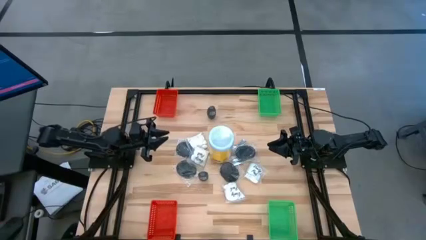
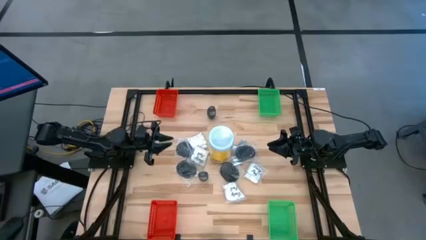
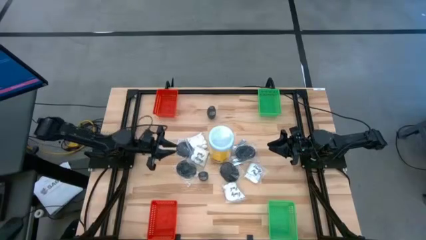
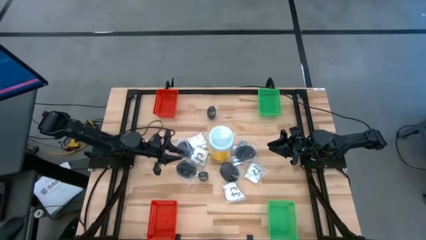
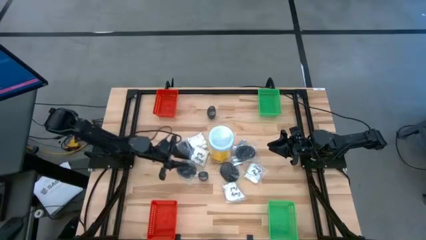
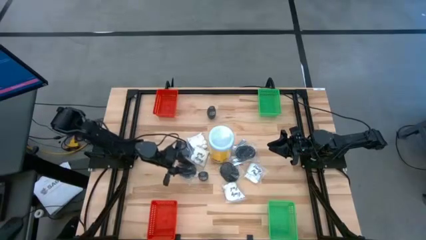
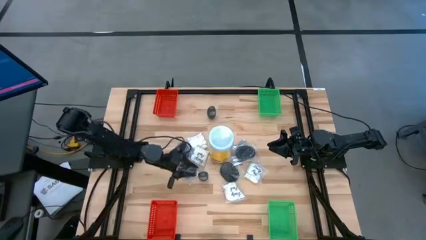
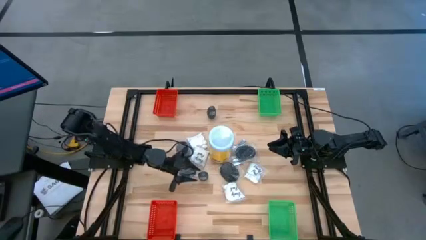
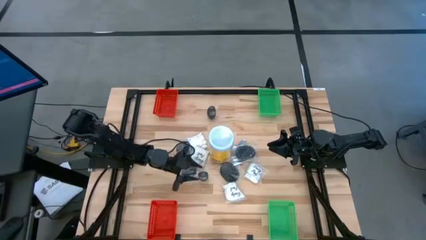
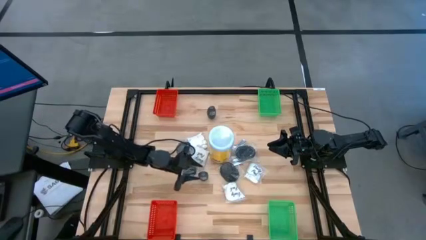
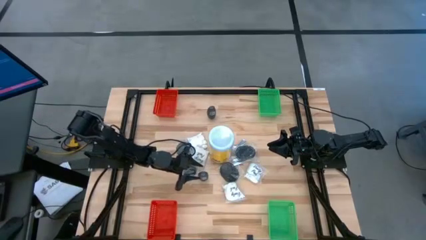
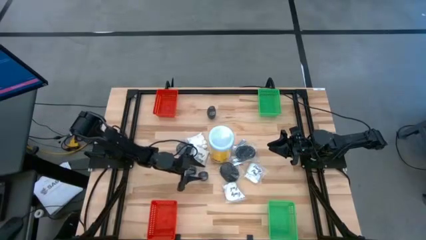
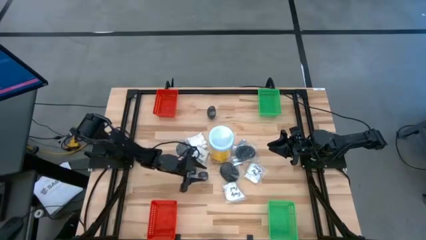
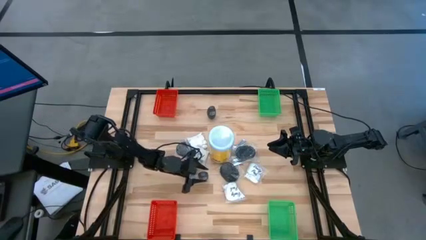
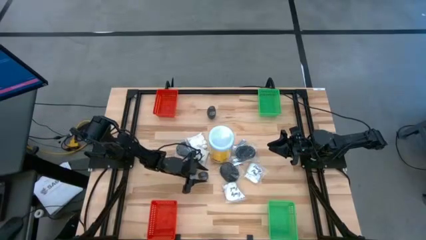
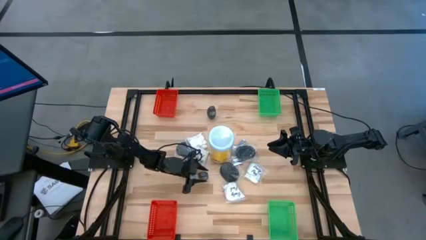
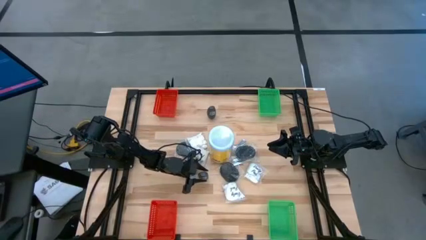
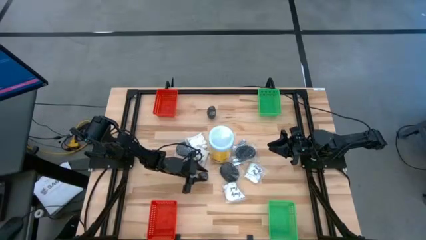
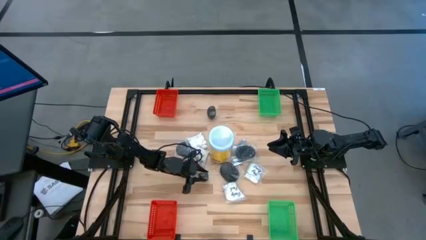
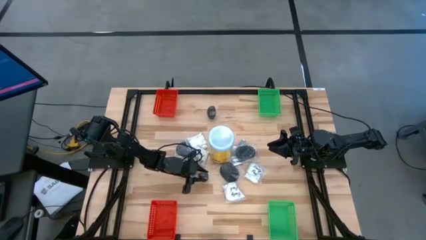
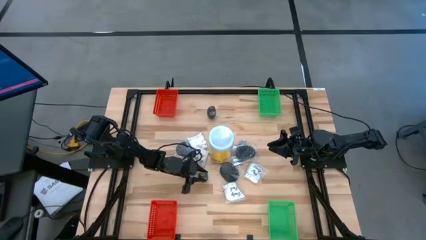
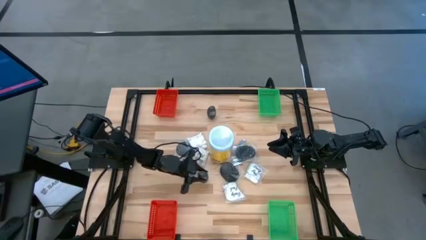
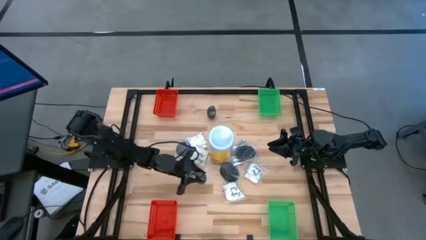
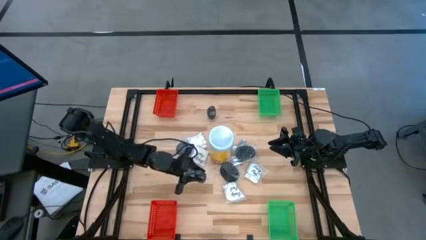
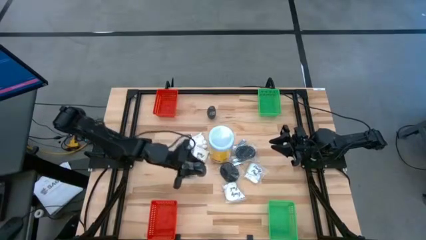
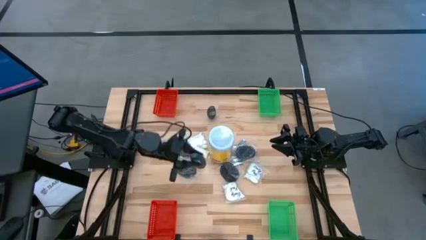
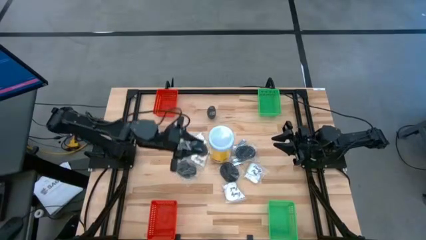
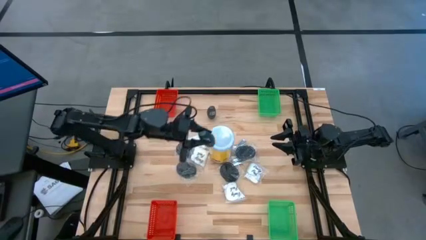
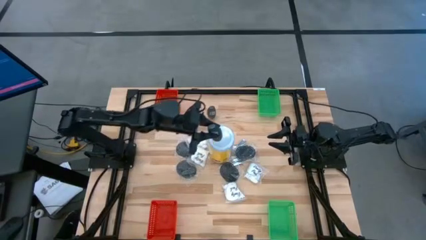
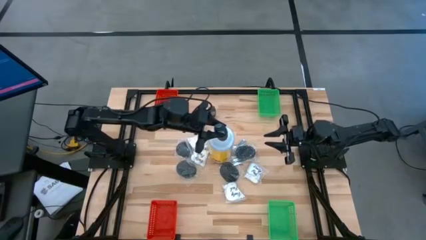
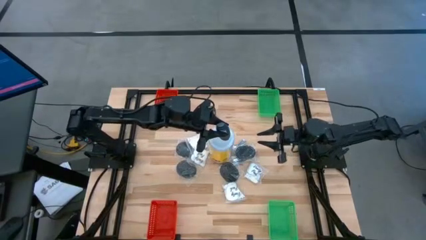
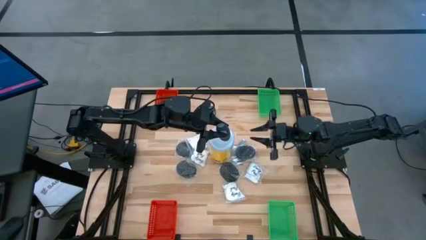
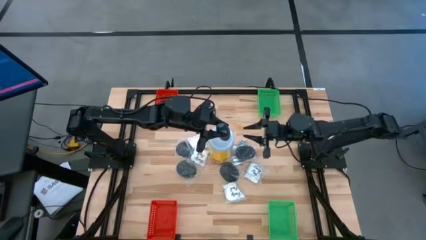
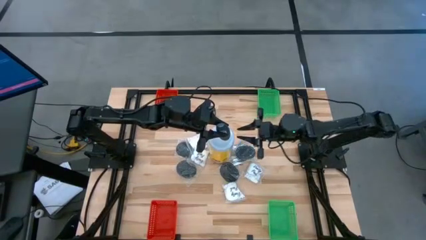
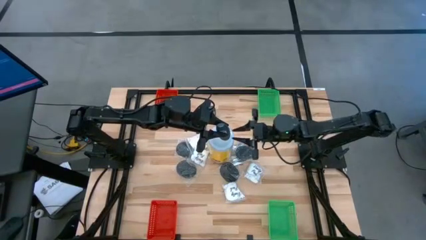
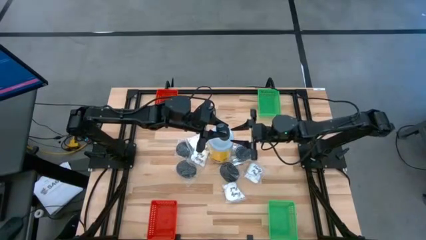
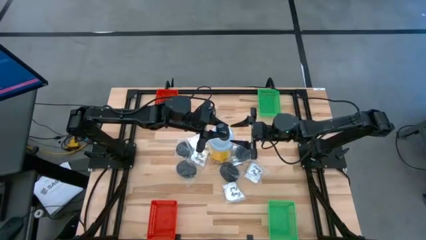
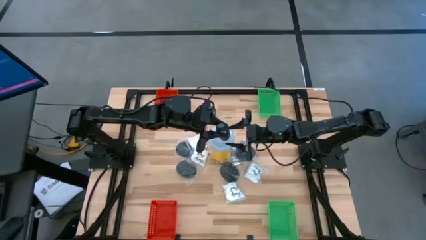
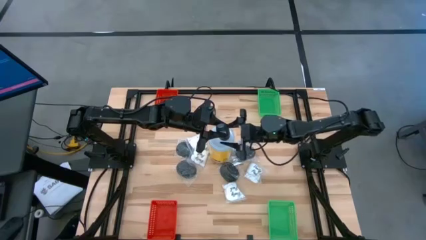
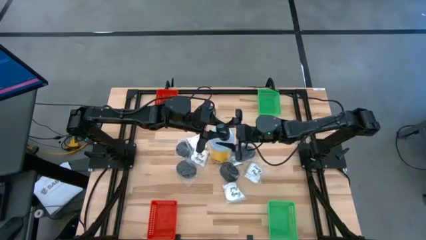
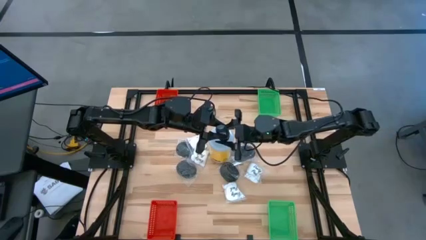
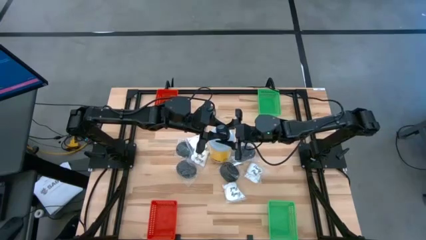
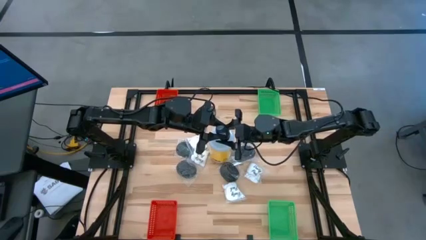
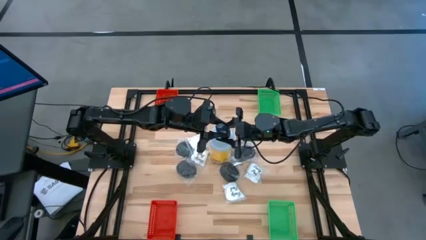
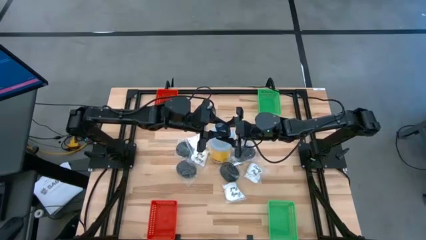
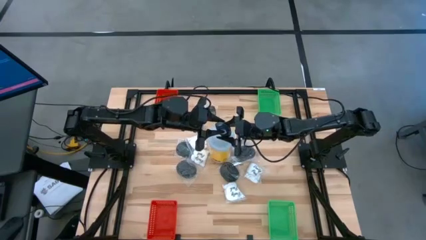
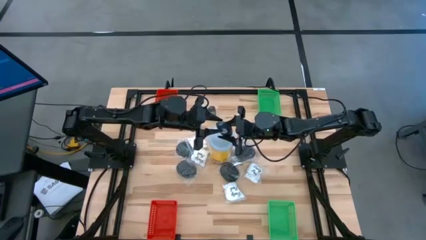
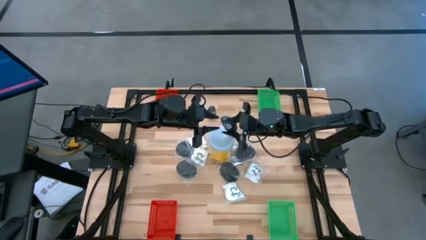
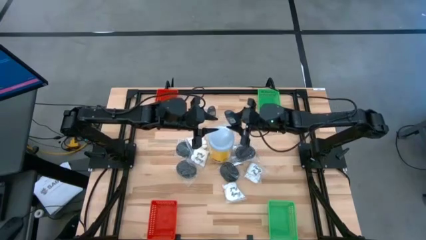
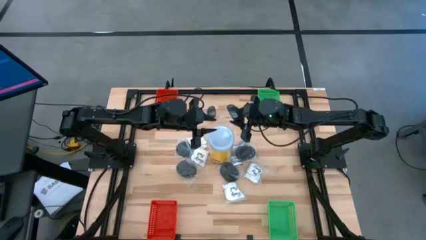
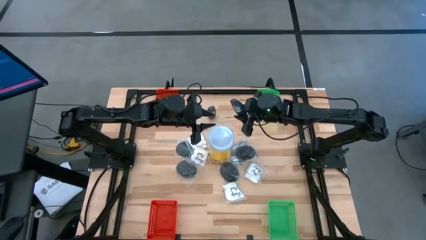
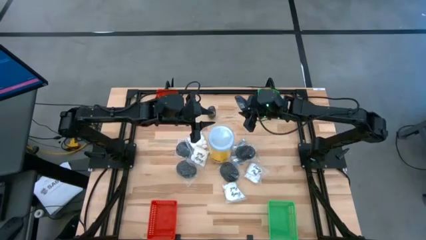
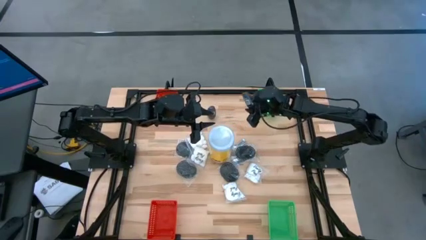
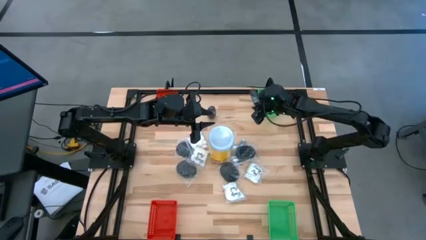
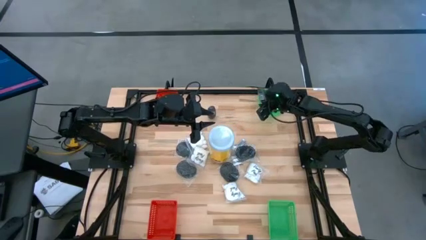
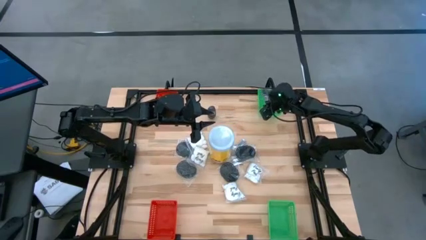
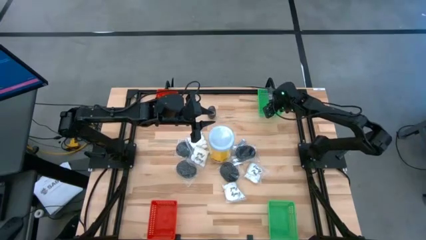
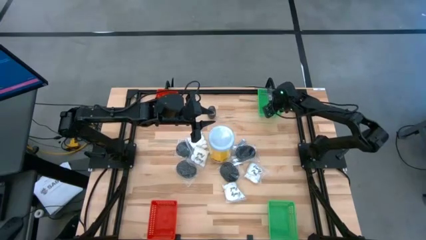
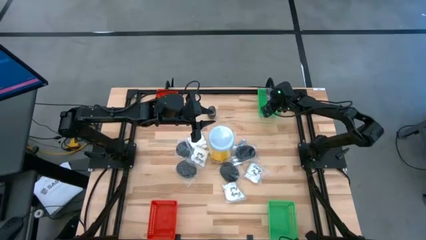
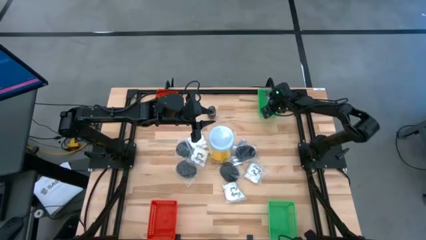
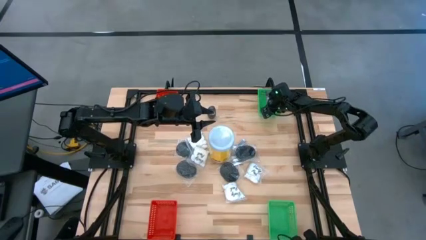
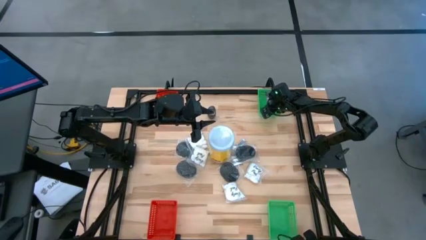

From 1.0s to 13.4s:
Task: Pick & Place Travel size toiletries
Put the bottom gray deodorant into the top green bin

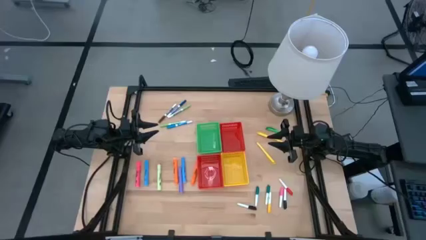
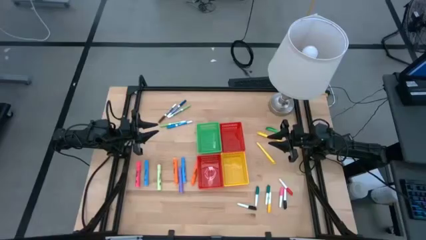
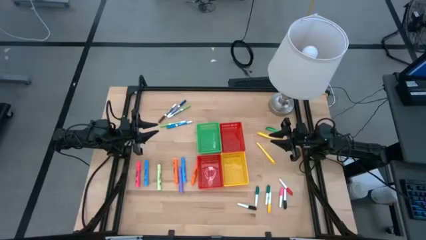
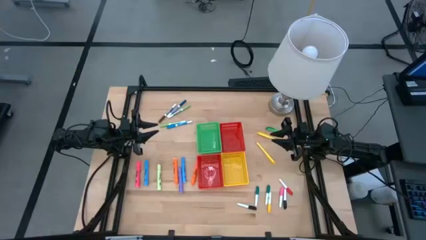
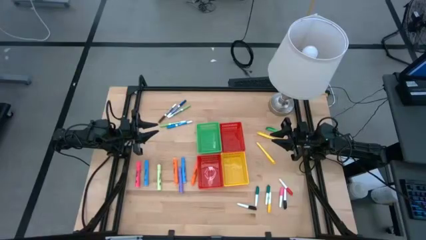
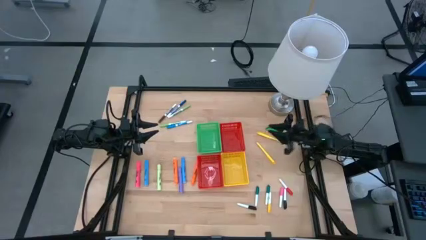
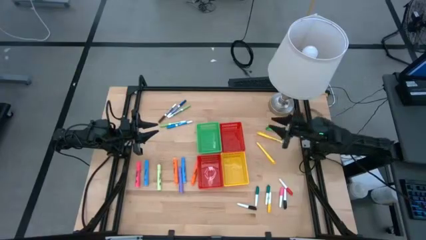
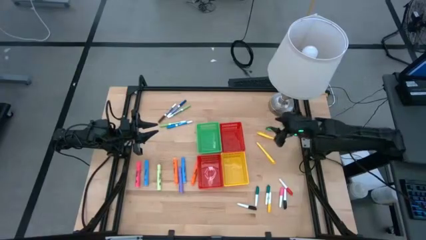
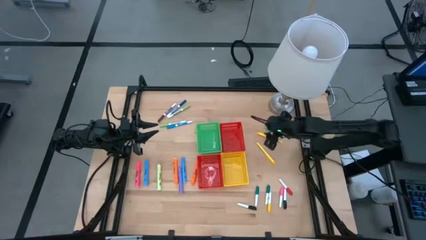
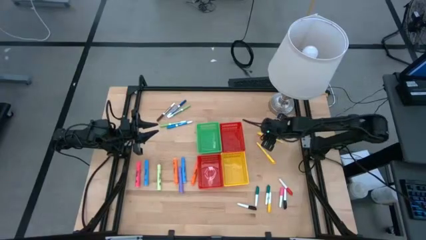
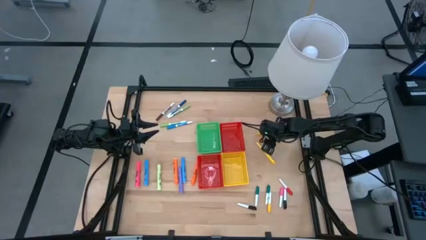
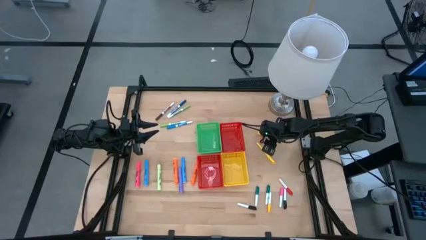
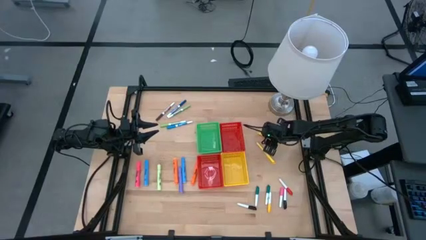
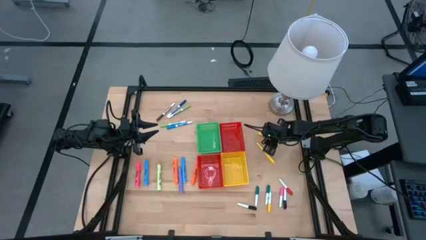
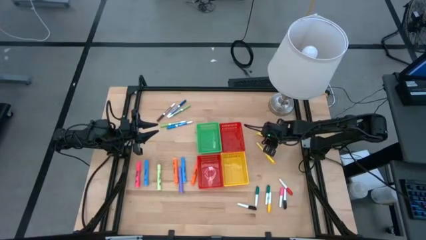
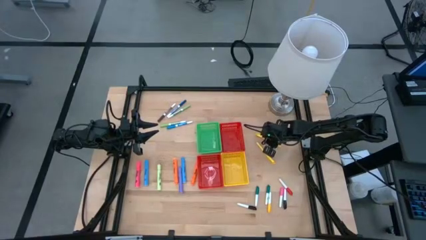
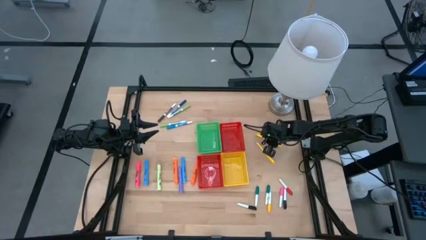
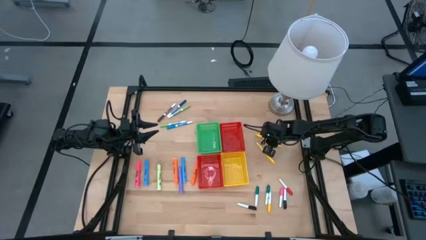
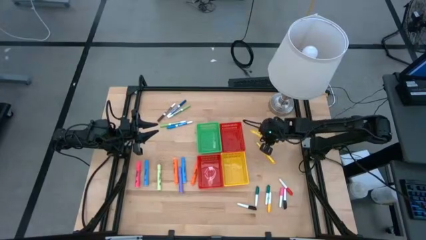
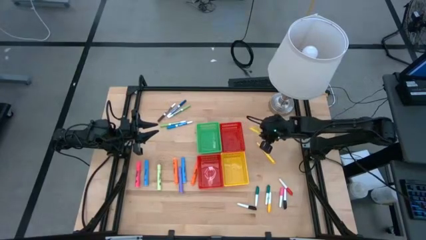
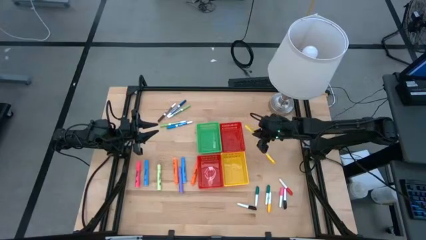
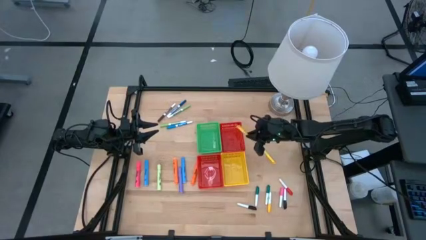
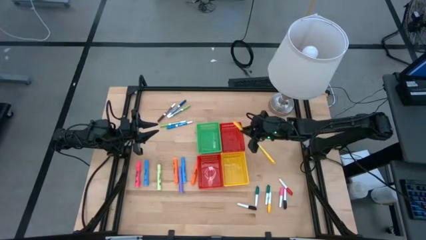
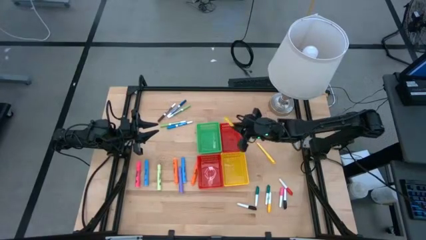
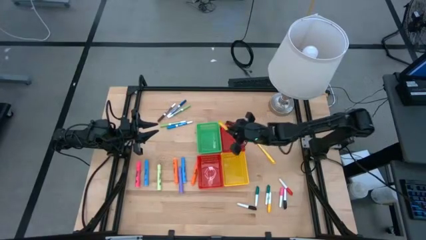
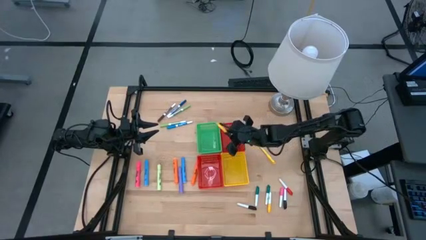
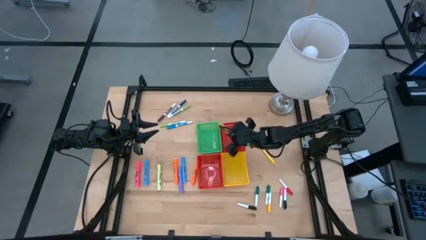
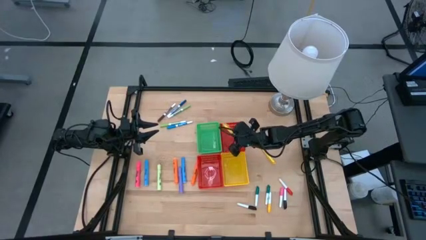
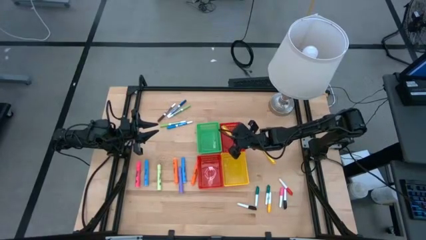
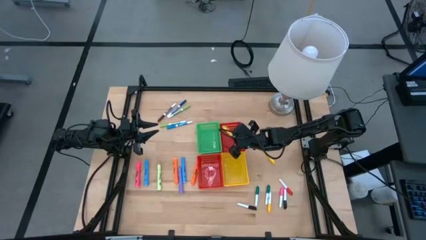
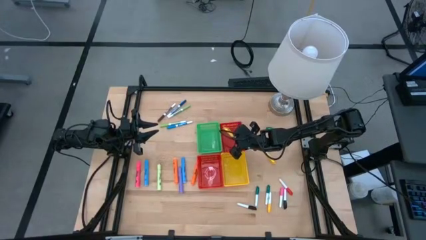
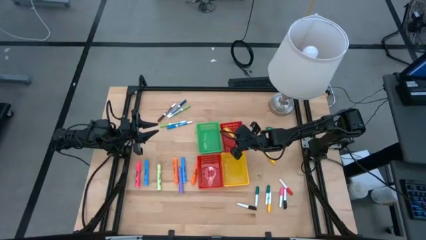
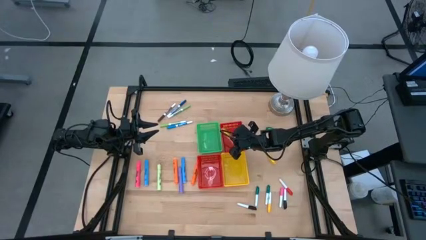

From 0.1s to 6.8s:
Task: Pick & Place Markers
Put the yellow pen into the top red bin
